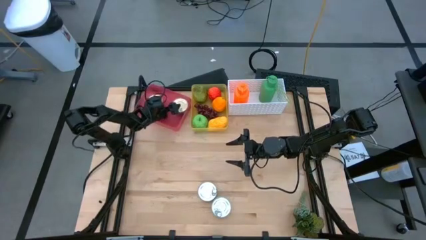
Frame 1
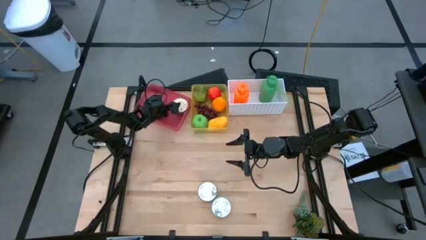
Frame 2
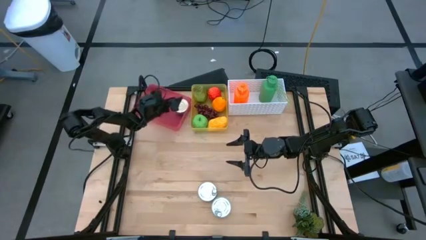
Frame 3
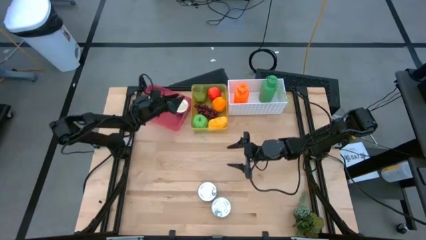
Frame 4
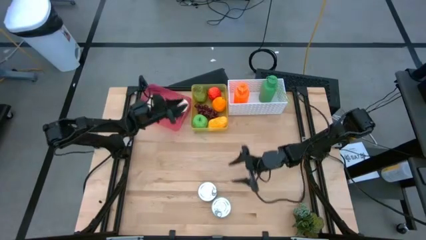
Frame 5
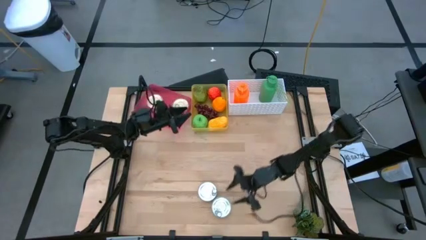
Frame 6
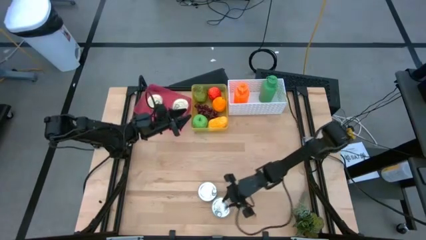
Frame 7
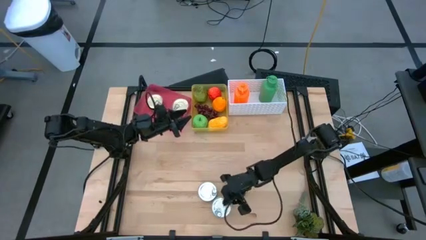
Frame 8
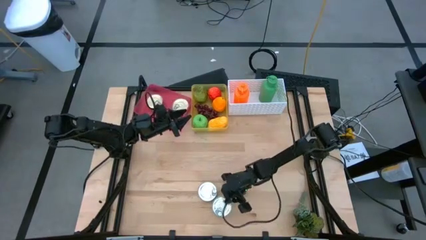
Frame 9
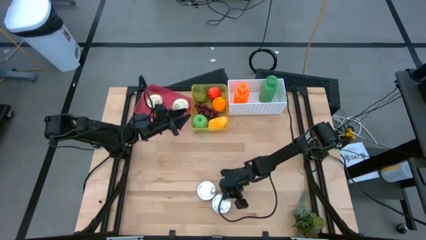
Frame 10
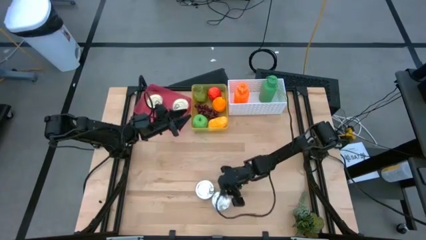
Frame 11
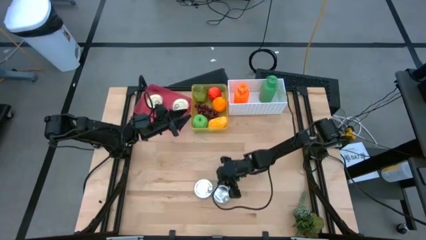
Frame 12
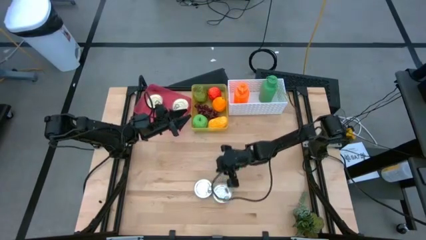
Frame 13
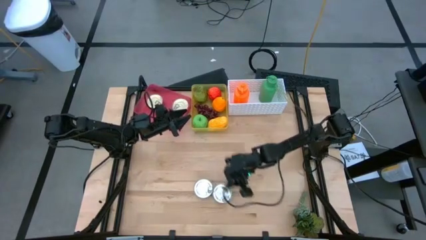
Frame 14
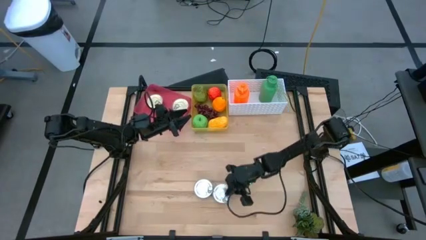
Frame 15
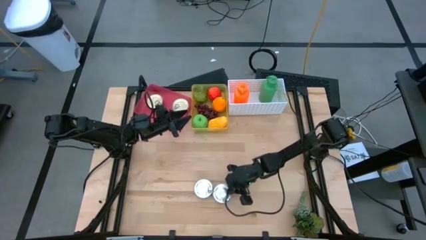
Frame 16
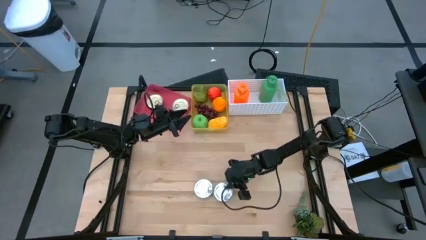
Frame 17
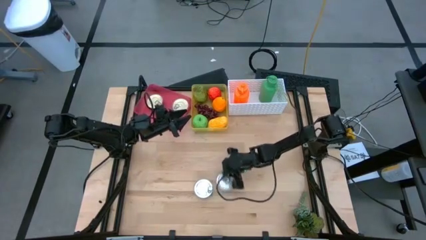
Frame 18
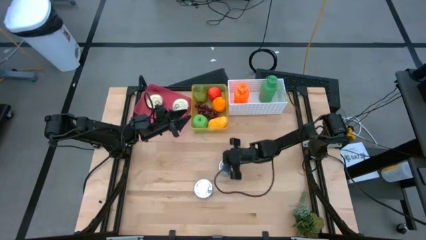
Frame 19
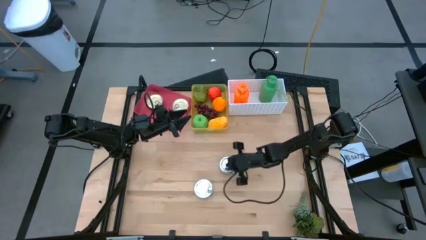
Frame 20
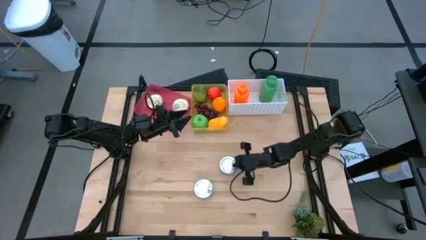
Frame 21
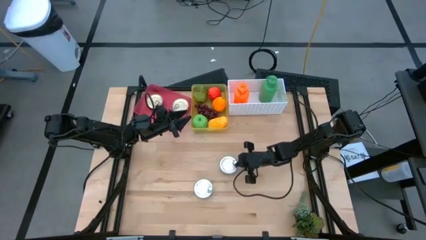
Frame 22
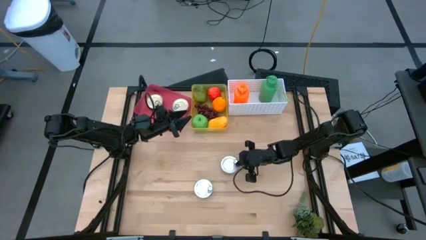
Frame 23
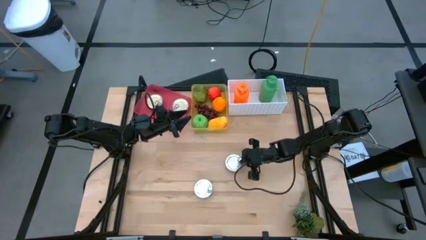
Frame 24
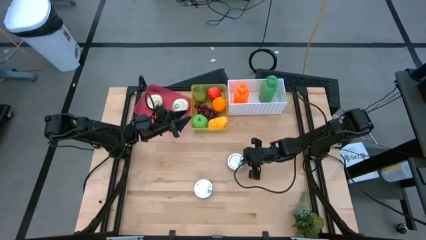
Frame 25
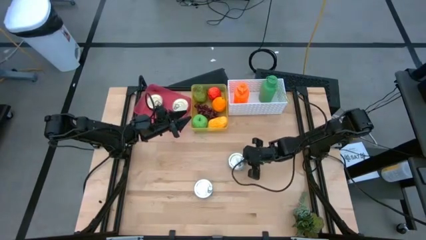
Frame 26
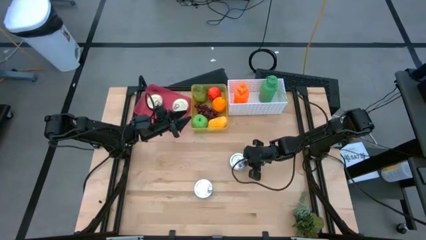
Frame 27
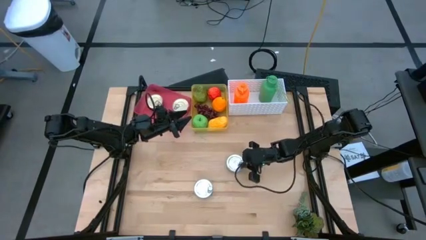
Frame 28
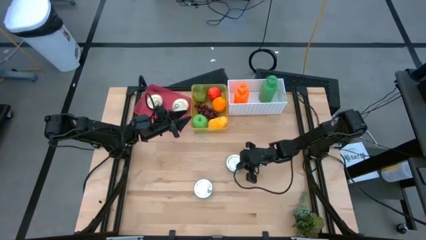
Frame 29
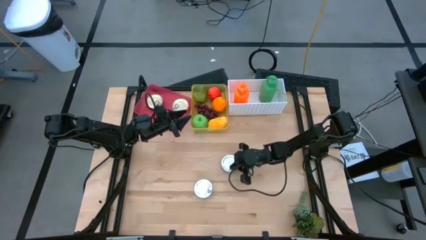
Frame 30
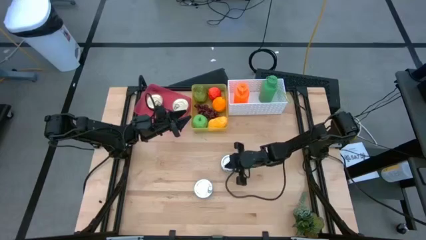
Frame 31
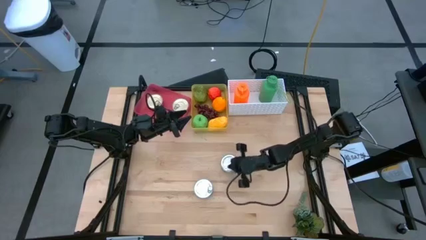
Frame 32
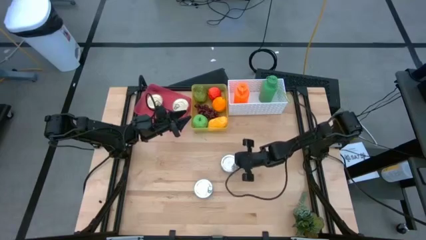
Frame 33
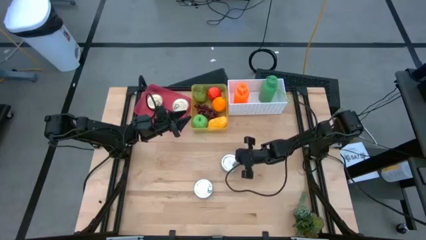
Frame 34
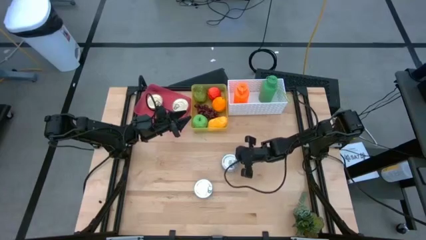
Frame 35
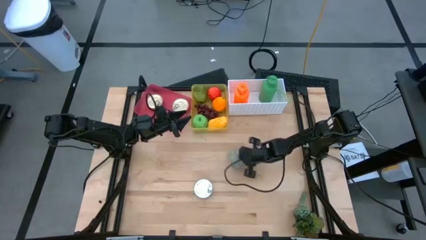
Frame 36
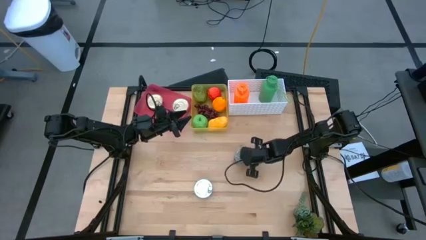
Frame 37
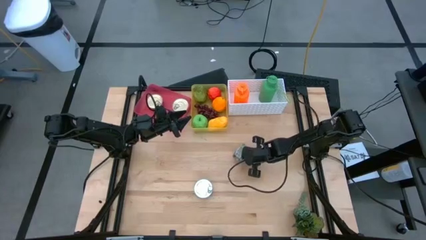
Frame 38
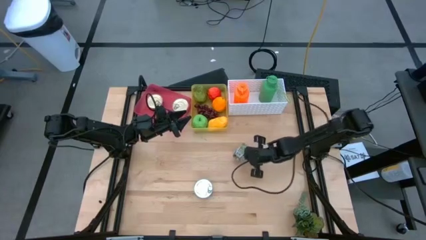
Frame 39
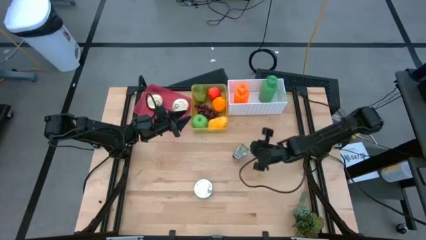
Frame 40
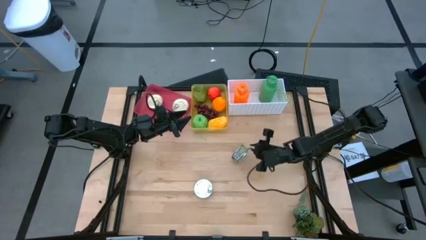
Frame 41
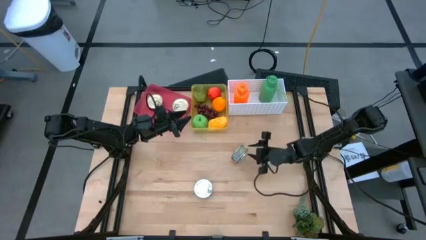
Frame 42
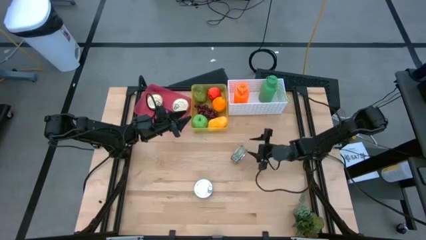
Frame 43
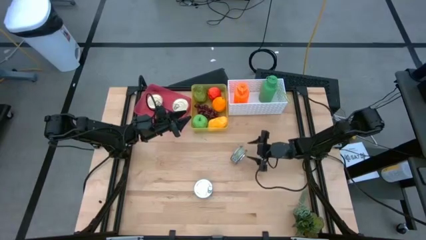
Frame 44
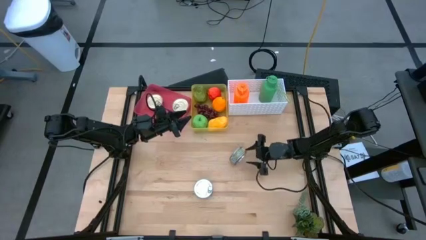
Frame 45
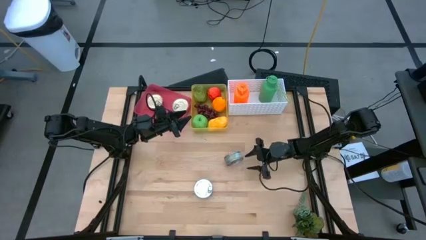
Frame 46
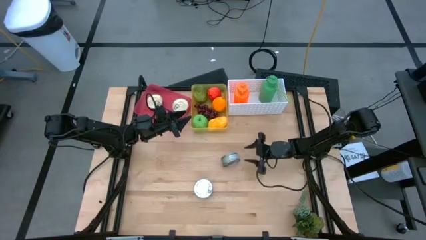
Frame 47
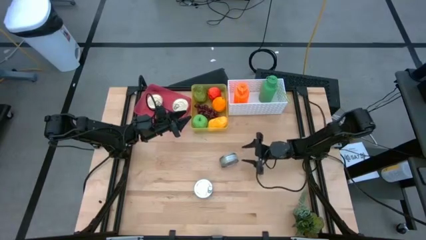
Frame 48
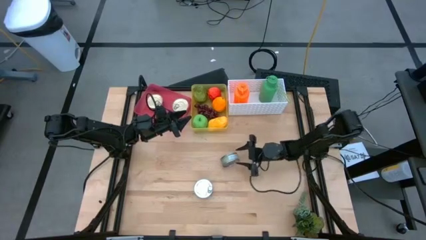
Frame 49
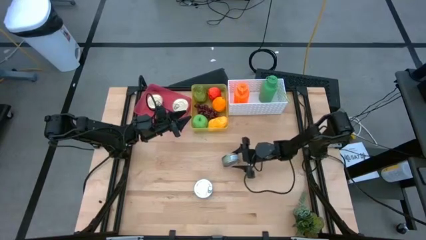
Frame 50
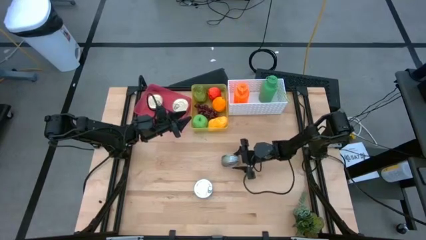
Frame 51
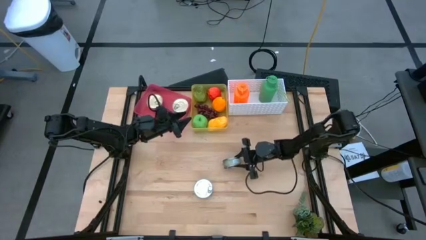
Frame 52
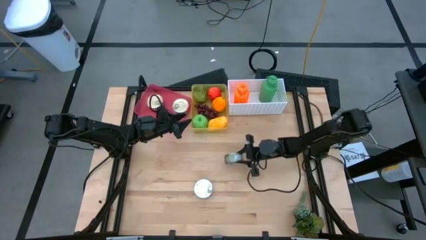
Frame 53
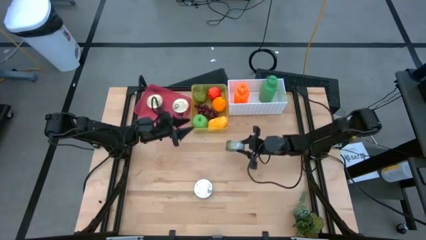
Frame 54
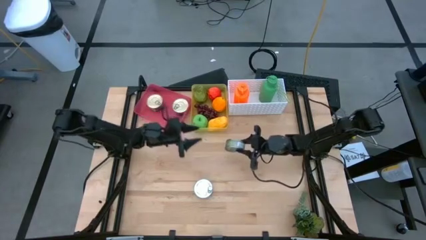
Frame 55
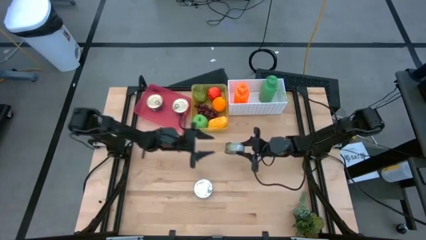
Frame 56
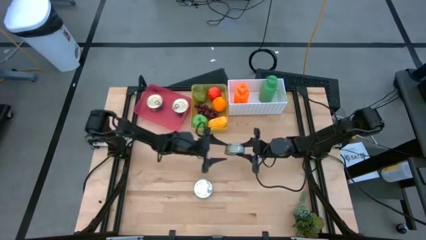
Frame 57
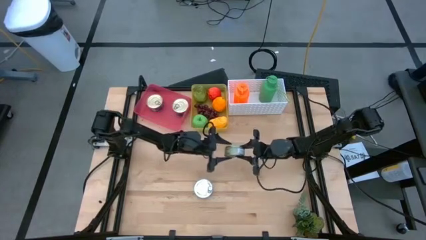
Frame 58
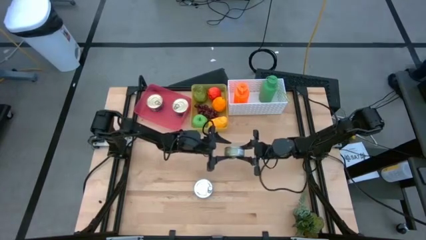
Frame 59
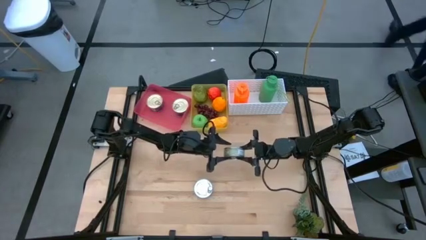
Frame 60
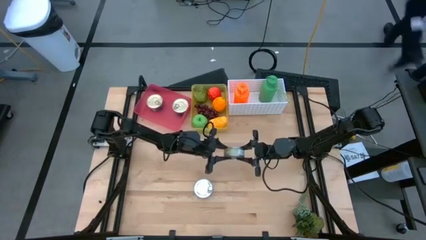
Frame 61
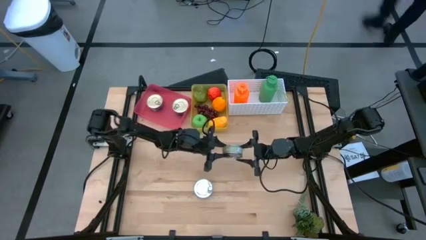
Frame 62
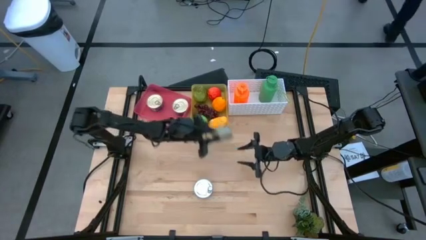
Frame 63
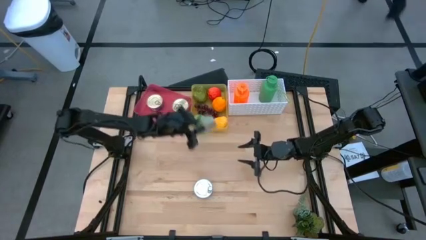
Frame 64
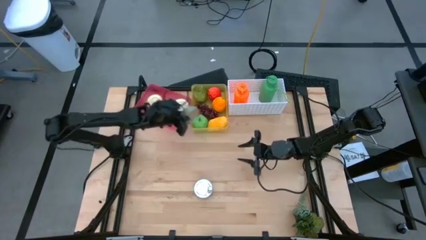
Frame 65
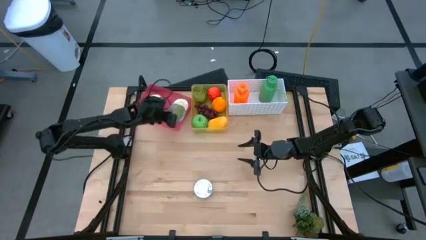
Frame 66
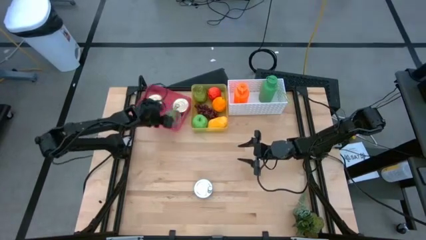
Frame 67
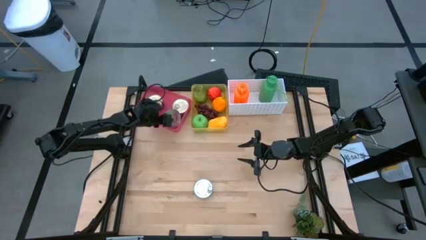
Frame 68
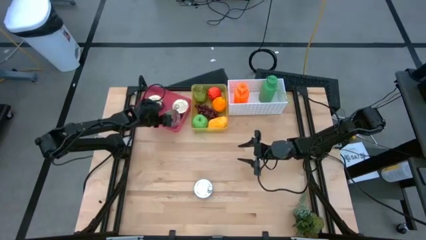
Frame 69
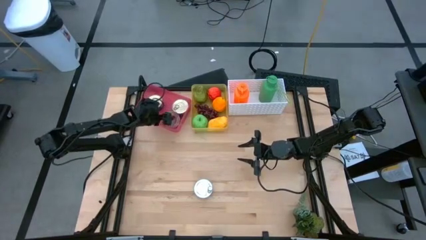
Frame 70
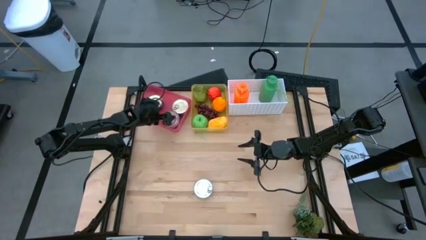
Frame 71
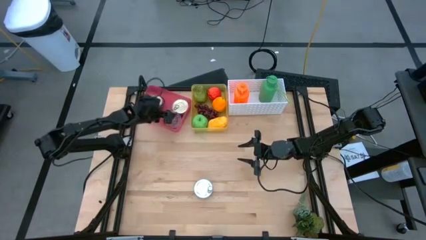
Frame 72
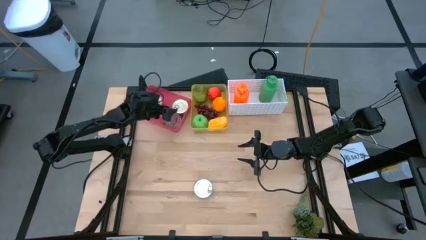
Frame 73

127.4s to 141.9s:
Task: Pick & Place Food Item
Put the bottom green tuna can into the red bin

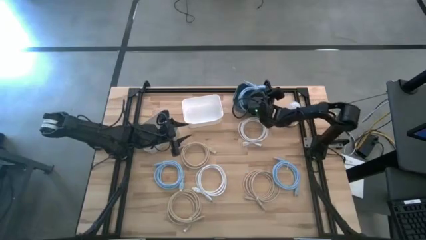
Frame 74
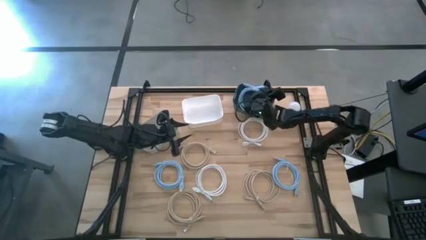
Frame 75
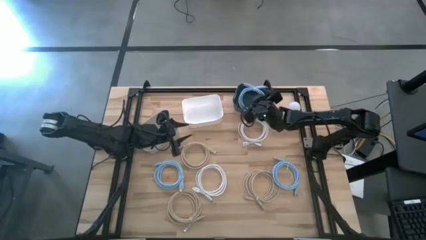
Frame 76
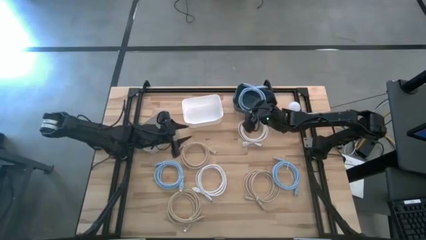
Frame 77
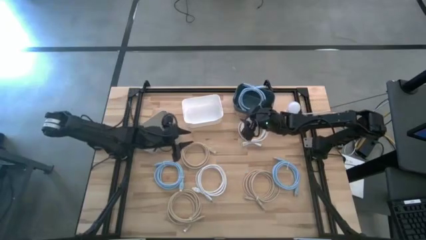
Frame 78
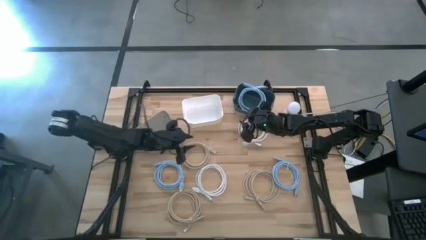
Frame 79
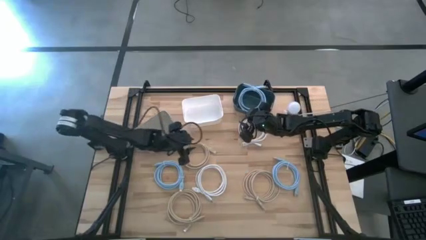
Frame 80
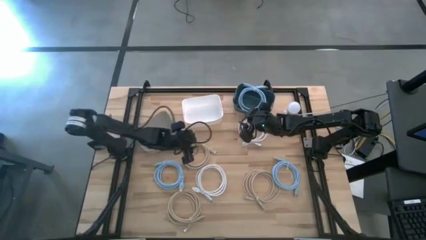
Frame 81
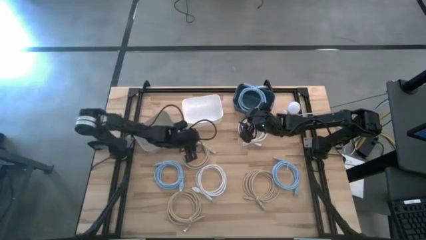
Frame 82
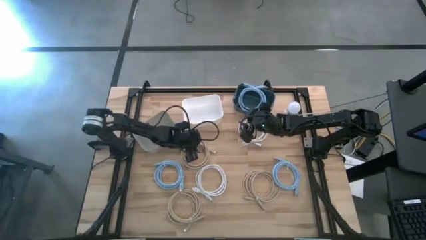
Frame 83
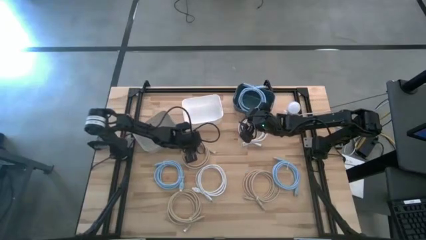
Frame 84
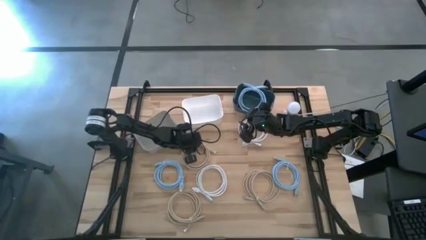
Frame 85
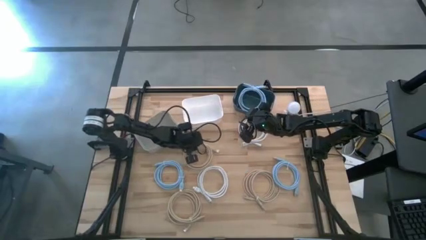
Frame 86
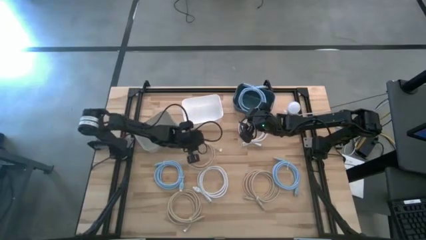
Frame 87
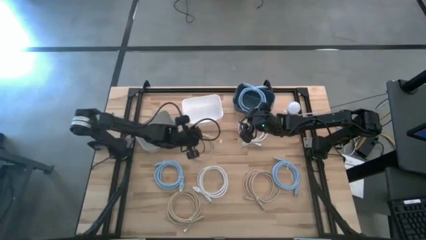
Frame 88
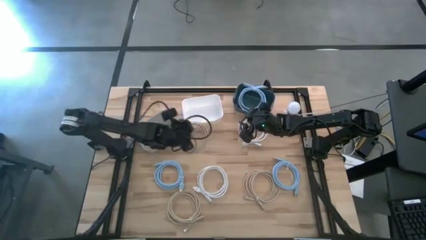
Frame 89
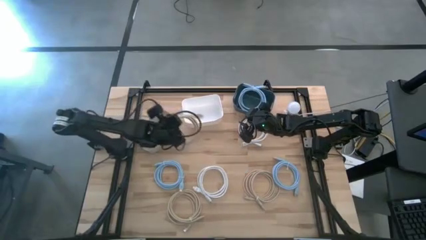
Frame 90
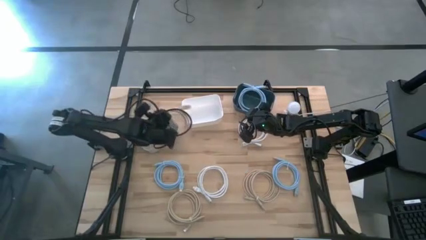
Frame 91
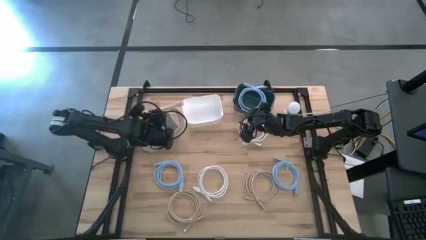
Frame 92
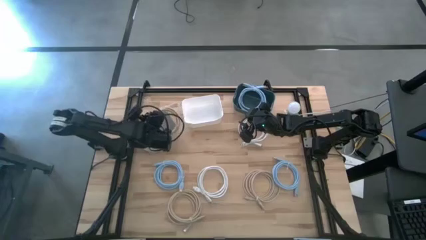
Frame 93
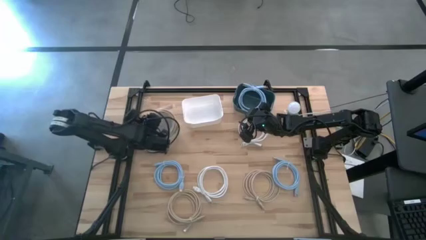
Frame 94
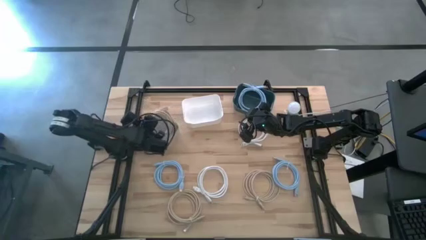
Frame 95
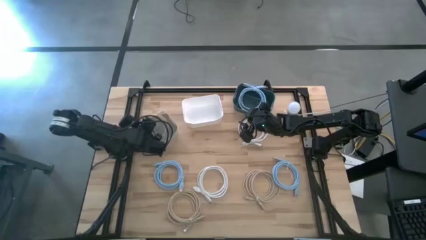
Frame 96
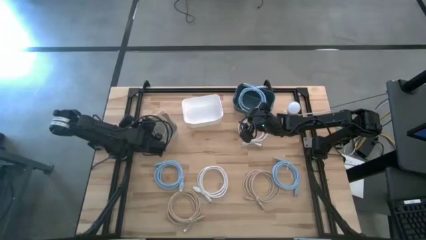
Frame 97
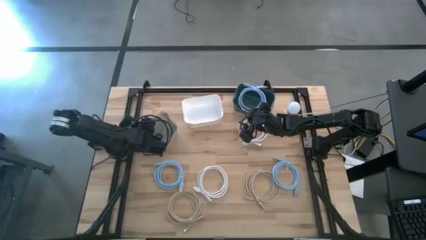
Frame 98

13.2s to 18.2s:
Task: Pick & Place USB Port
Put the top brown charger cable into the gray bin
